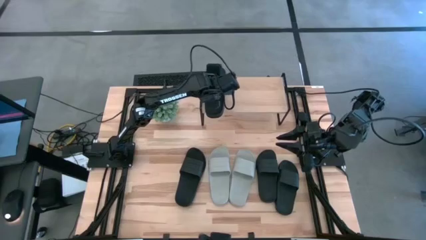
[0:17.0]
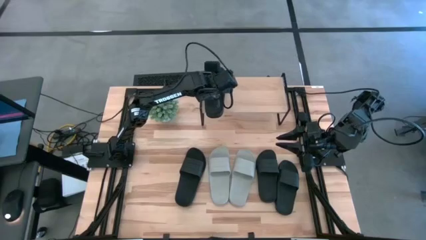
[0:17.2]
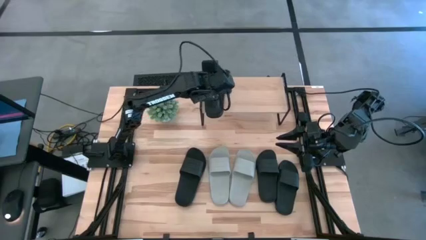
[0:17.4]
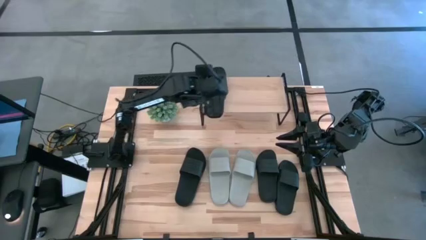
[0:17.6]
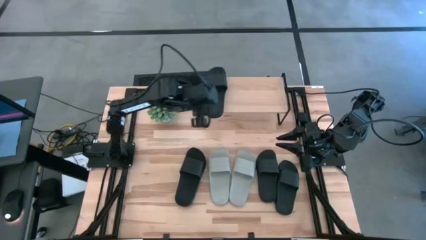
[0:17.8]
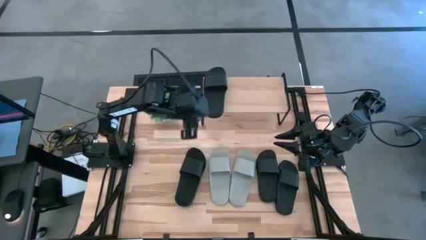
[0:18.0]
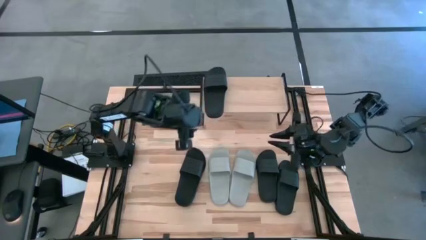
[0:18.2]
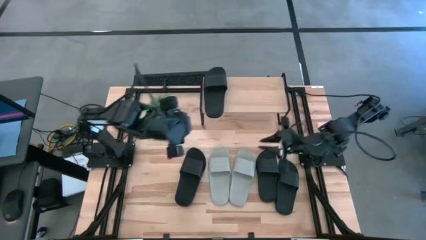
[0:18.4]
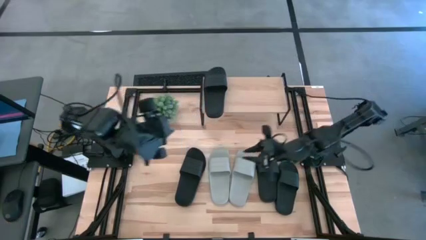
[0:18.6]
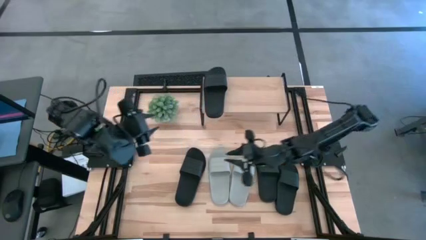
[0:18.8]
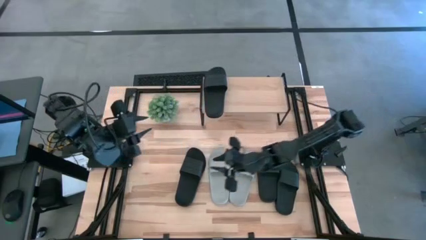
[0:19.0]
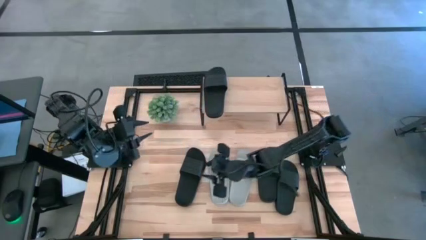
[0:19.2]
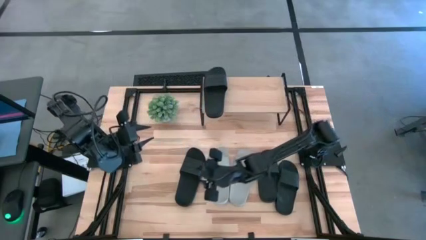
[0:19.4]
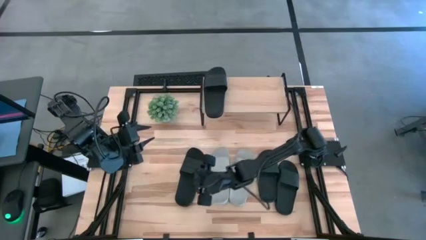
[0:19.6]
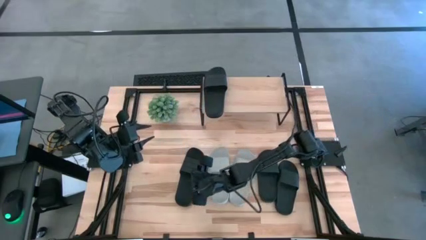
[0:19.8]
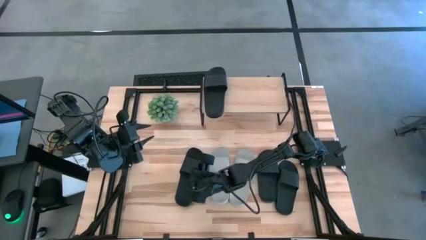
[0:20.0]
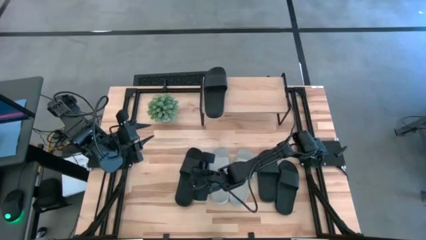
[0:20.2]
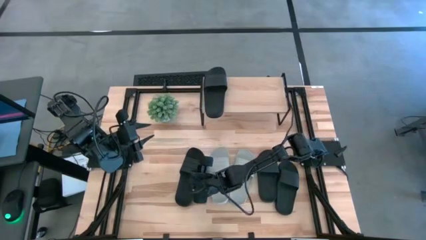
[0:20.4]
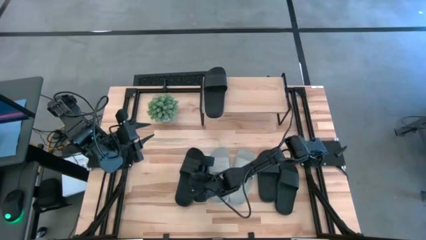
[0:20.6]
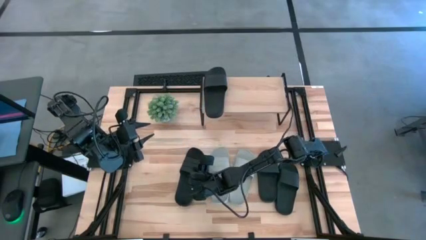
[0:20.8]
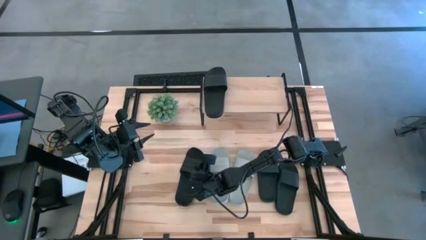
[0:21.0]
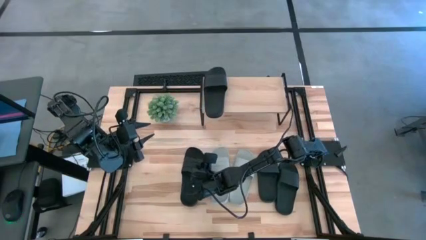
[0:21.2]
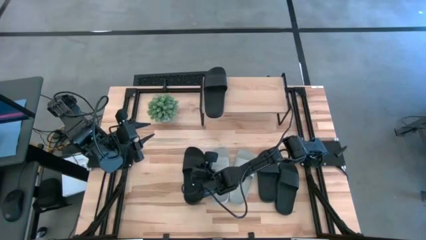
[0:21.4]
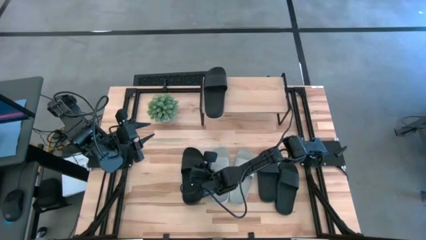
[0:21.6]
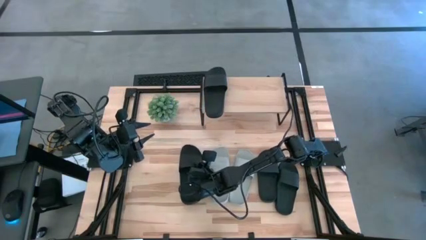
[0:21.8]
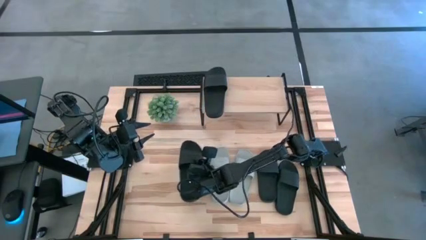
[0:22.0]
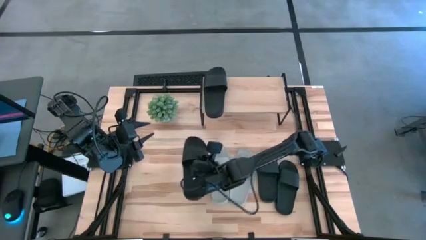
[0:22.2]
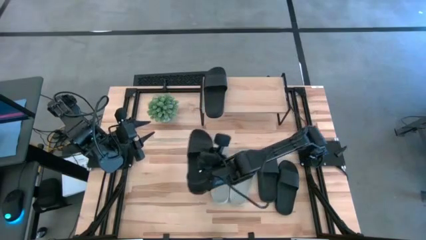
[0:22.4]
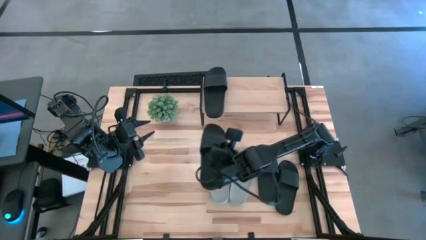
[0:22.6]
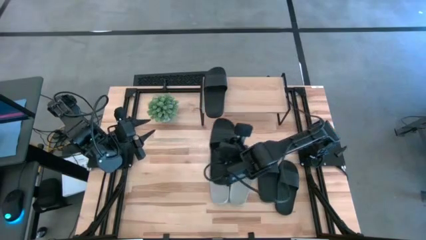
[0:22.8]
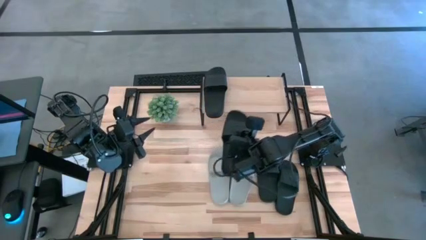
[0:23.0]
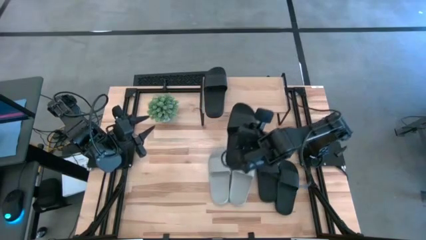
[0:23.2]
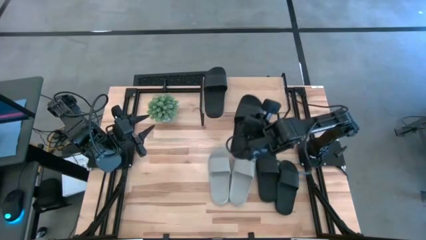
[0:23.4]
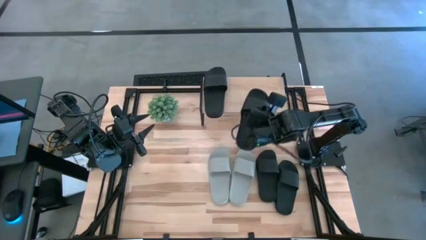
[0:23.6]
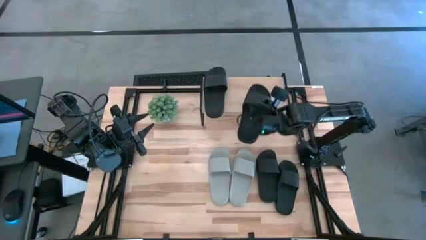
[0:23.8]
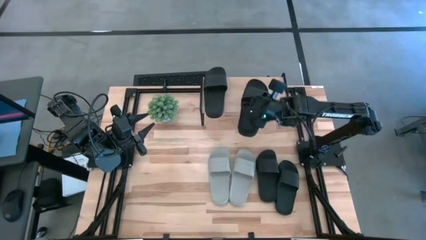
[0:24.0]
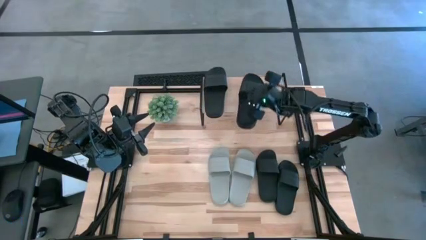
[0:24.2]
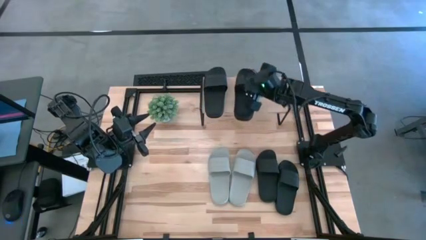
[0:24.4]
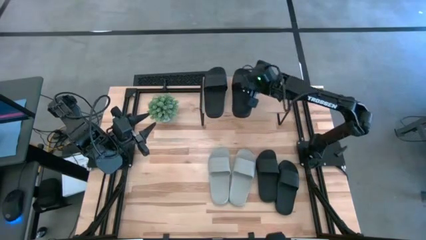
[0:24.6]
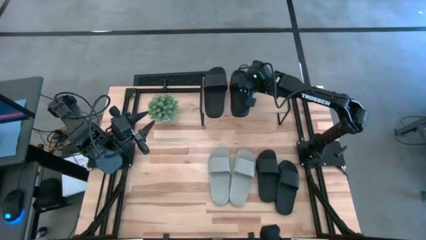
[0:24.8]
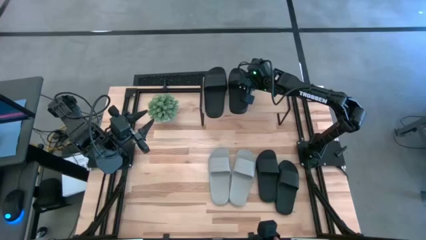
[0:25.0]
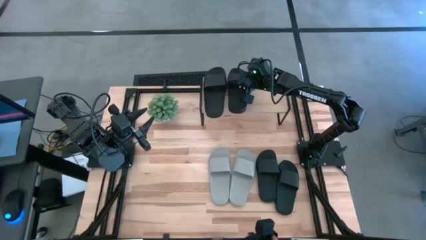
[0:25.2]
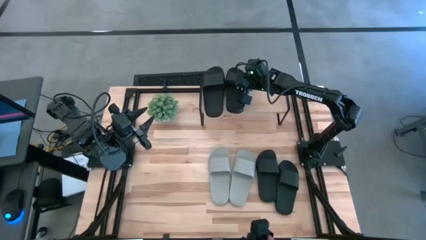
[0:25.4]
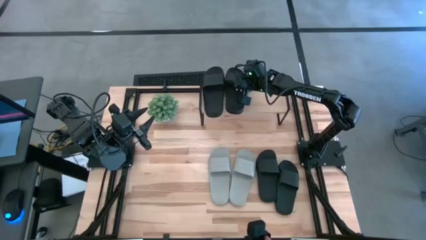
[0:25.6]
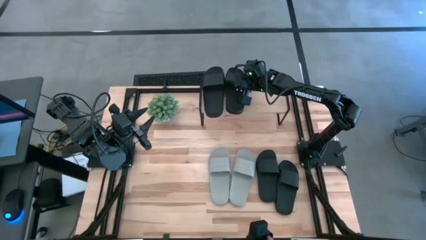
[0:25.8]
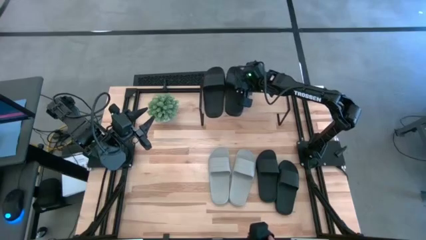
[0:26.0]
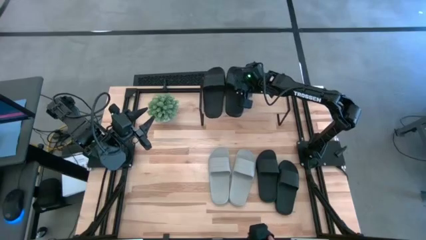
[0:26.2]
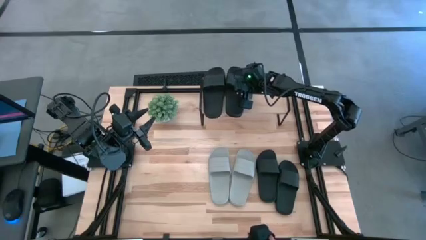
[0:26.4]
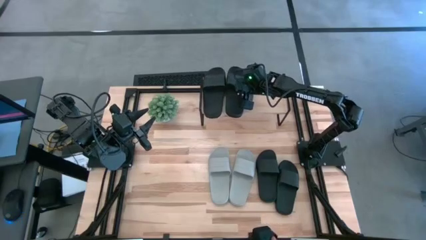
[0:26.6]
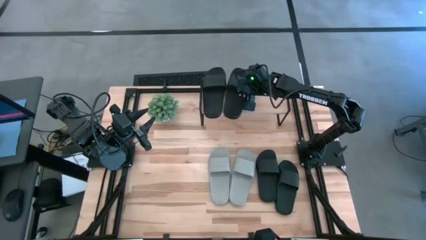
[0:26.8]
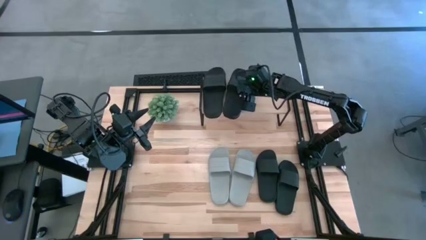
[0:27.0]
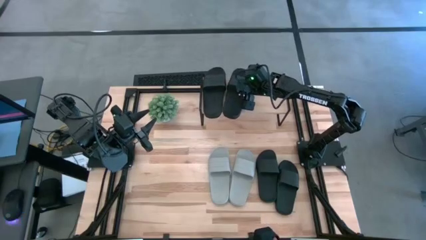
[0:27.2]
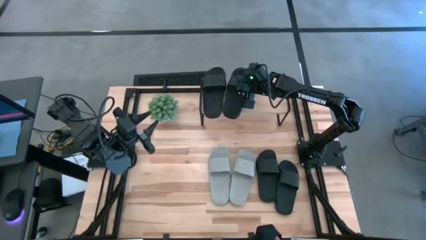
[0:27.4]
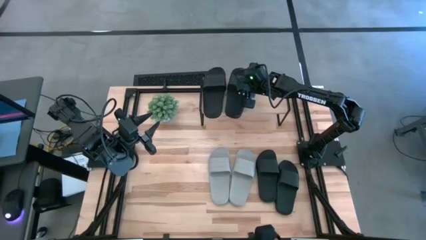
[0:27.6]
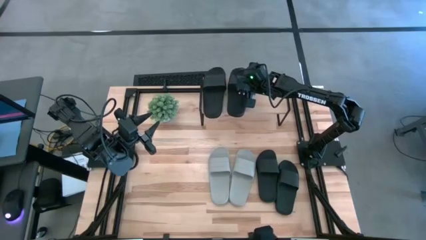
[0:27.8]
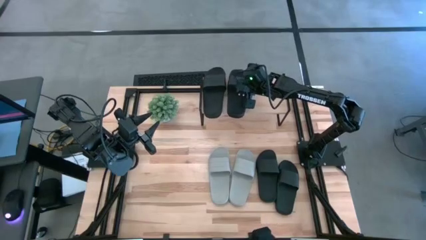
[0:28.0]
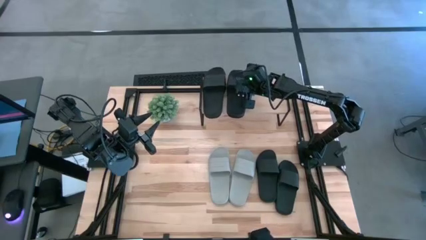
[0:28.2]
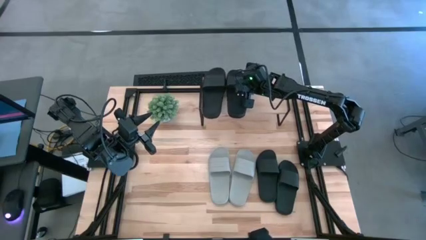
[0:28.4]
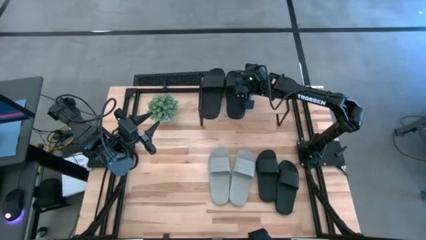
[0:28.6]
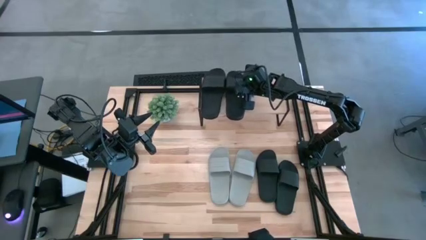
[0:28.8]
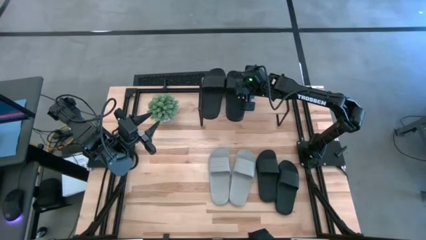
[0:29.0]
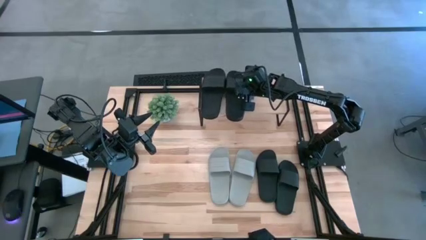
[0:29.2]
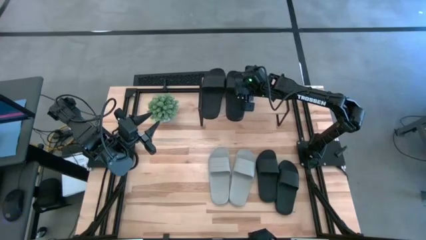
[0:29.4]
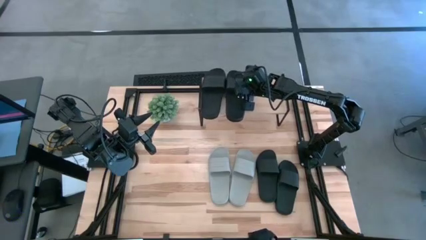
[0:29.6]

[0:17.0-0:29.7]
Task: Pick and place slides into the shelf
Put the left black slide on the shelf

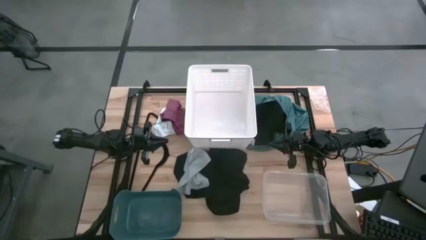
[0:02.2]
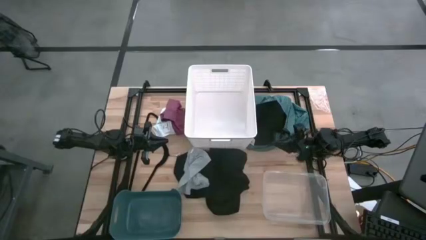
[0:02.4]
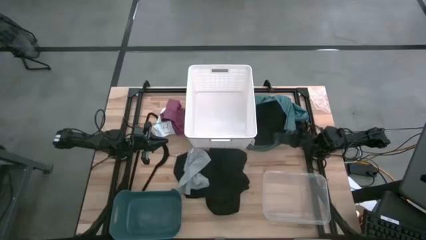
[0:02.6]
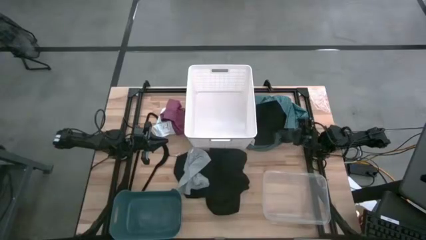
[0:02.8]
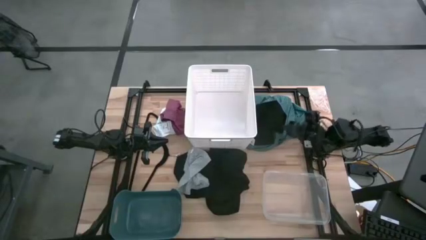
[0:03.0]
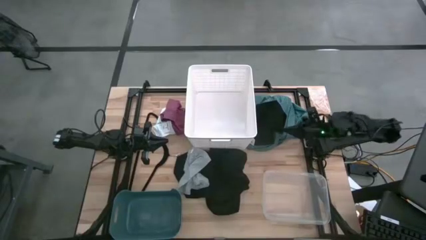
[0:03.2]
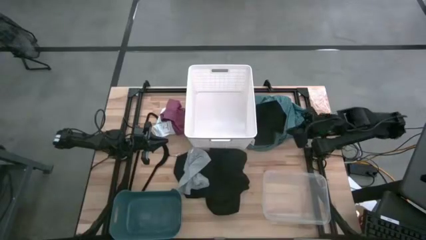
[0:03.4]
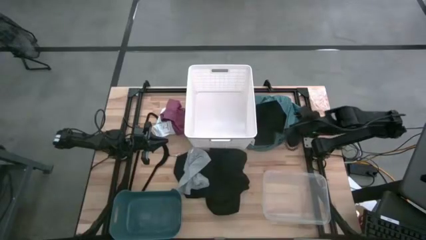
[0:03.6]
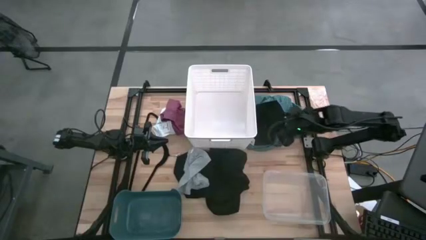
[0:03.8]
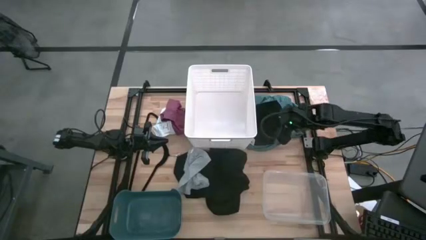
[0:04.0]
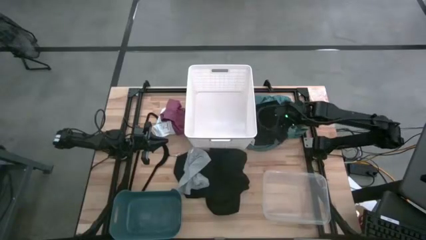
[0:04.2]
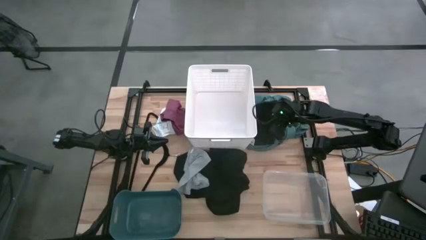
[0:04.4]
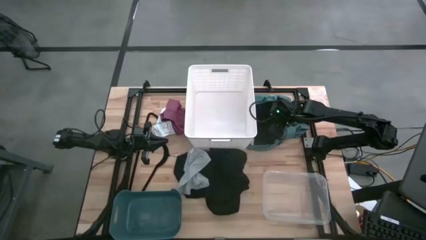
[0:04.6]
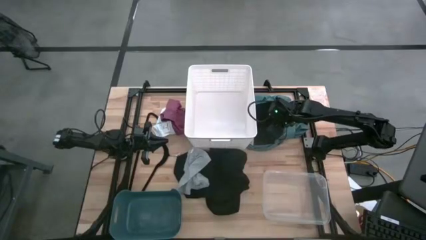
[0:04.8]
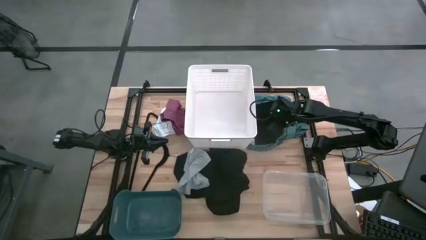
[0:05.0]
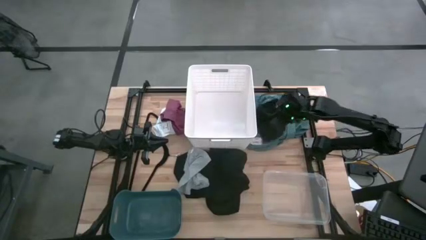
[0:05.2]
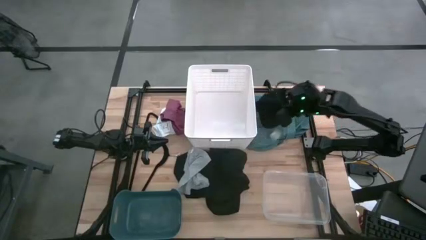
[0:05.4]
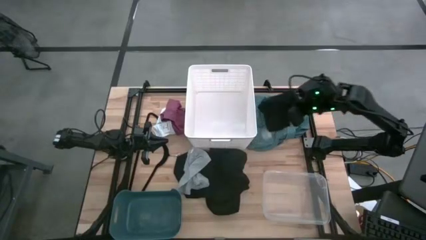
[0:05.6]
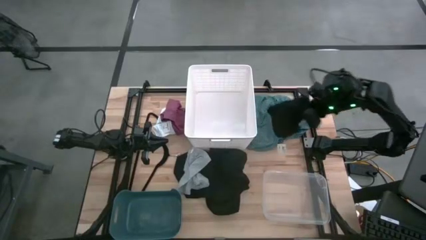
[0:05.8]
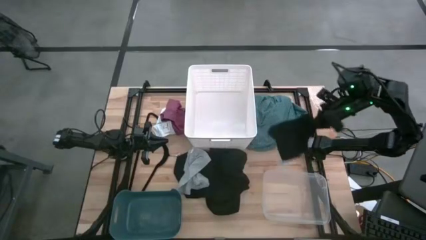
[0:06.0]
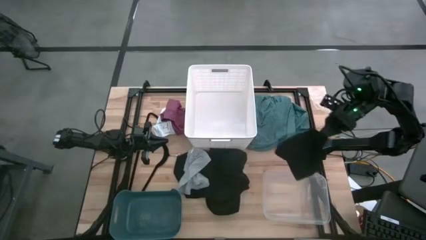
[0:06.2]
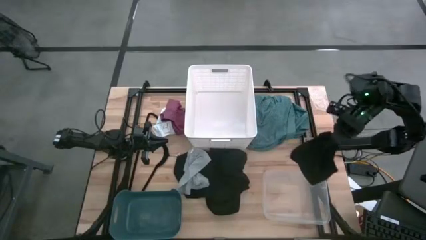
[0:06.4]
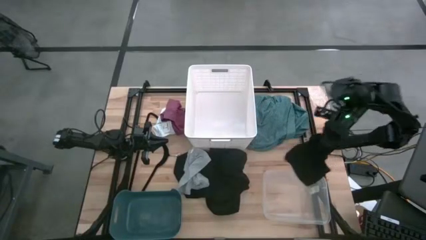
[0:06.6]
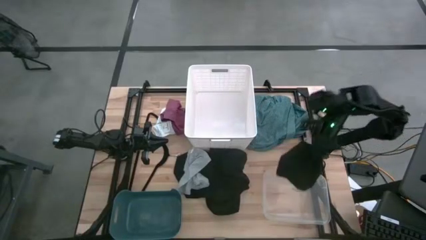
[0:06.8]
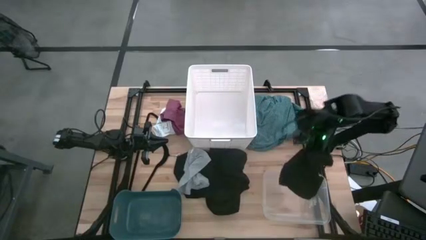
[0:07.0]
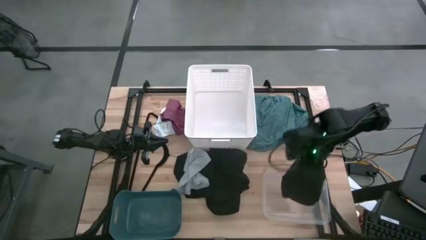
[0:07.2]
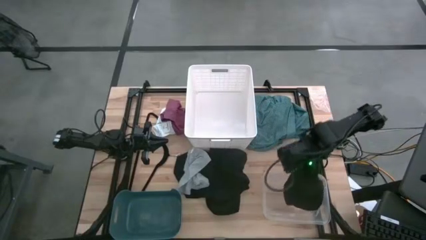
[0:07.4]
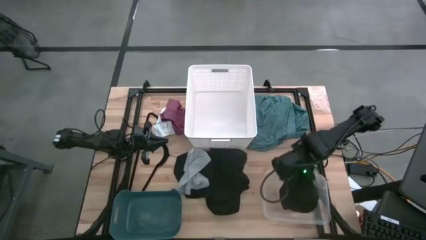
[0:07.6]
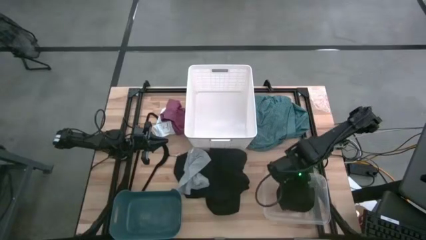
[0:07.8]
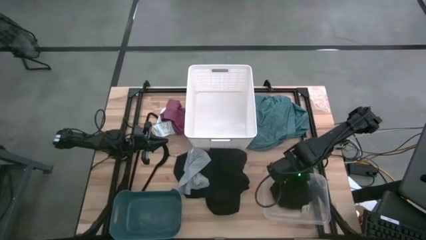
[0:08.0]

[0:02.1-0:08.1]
Task: Pick & Place Cloths
Put the black underwear into the transparent bin
